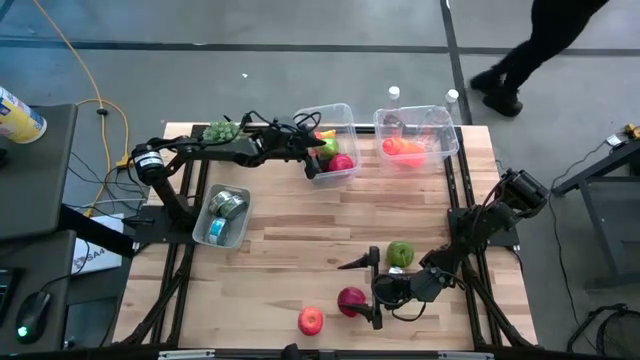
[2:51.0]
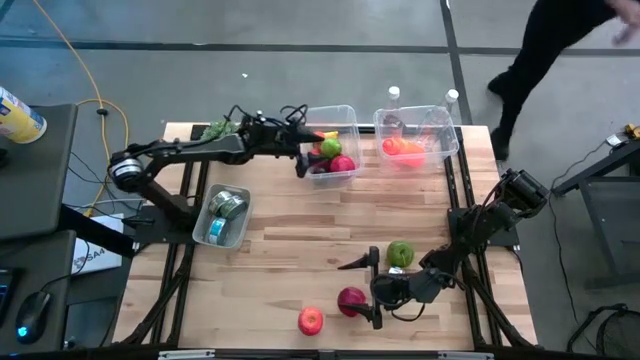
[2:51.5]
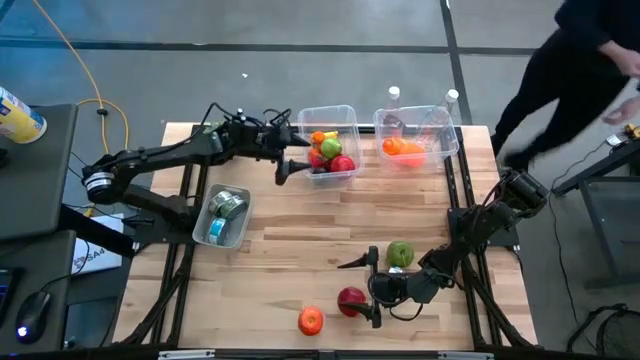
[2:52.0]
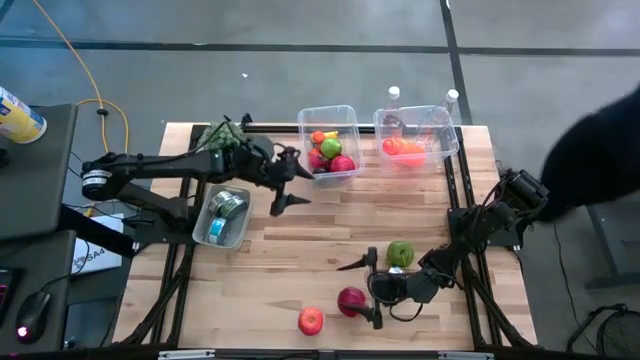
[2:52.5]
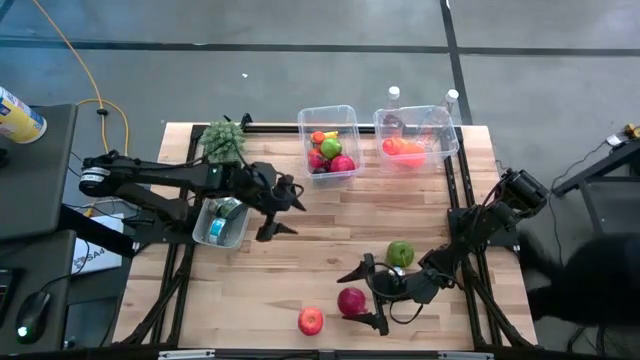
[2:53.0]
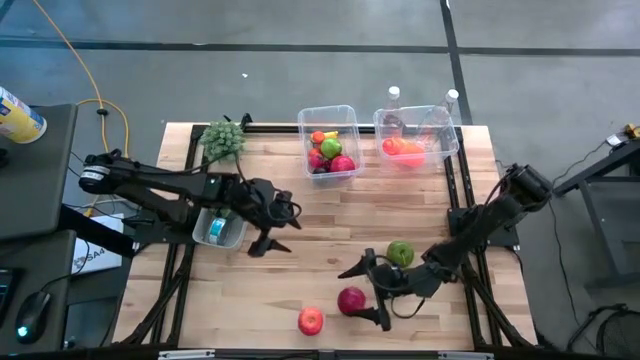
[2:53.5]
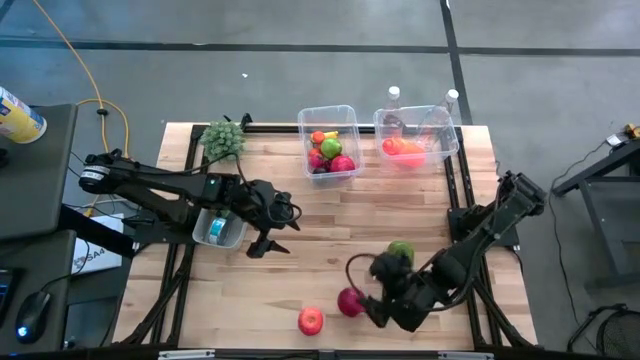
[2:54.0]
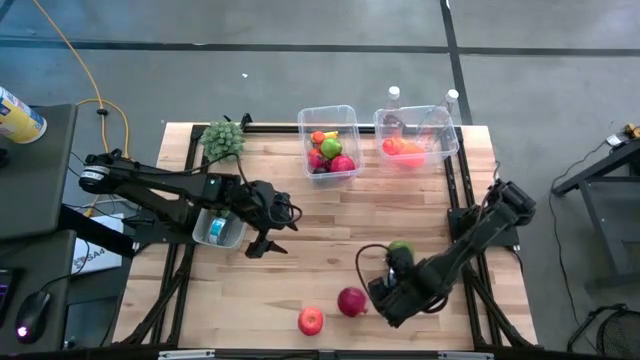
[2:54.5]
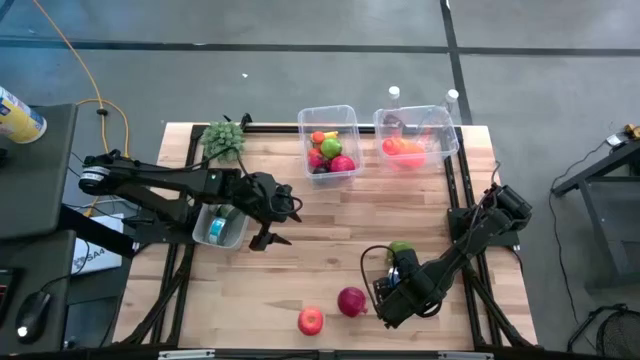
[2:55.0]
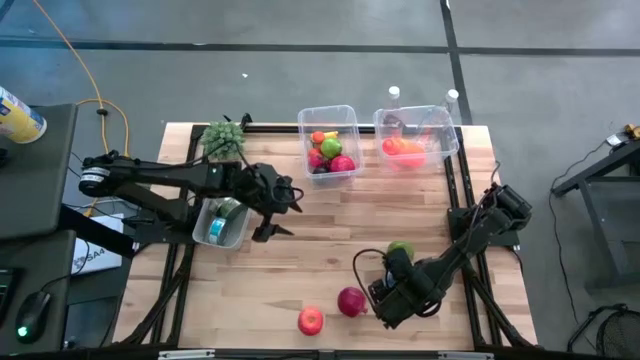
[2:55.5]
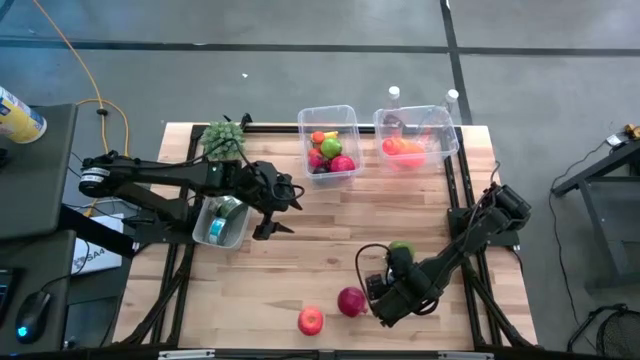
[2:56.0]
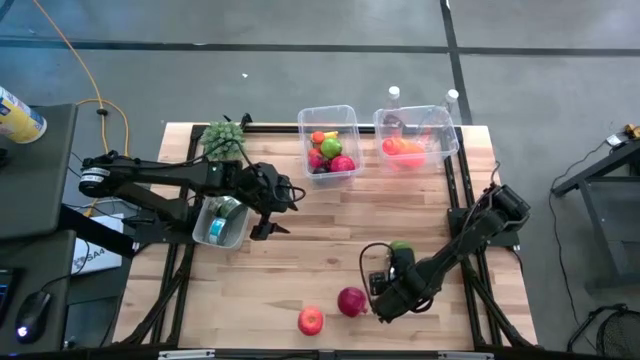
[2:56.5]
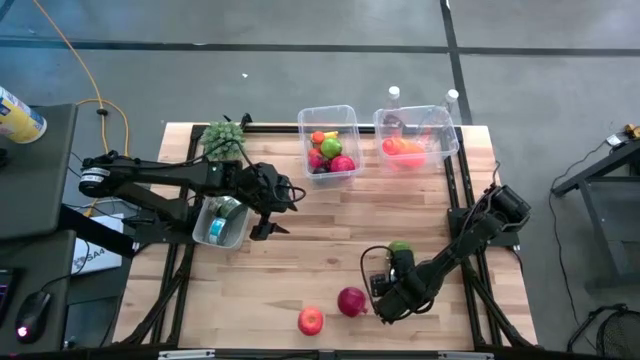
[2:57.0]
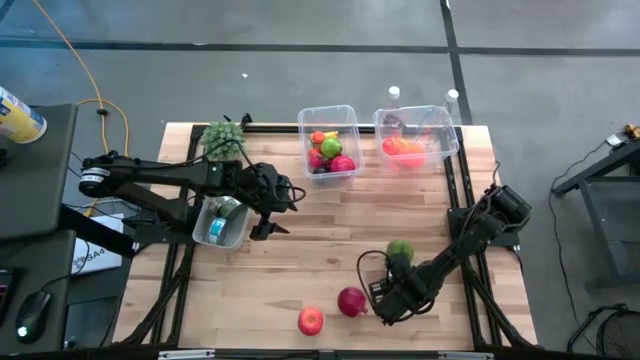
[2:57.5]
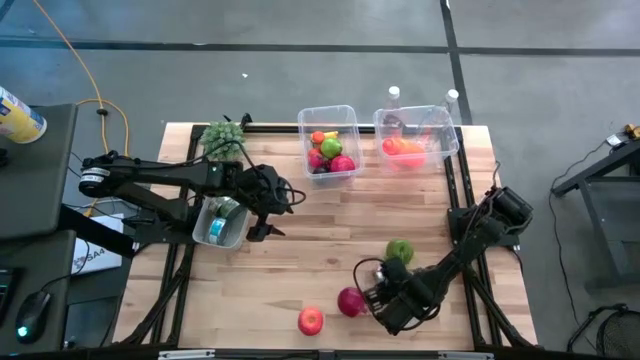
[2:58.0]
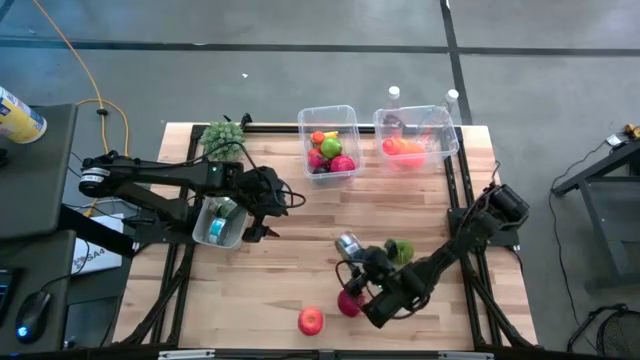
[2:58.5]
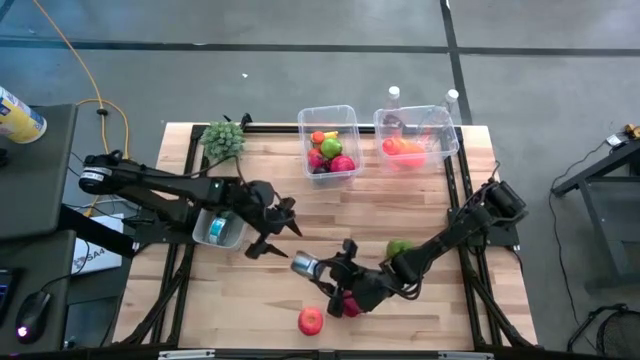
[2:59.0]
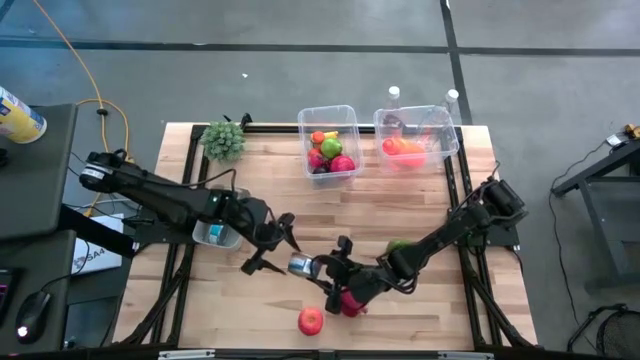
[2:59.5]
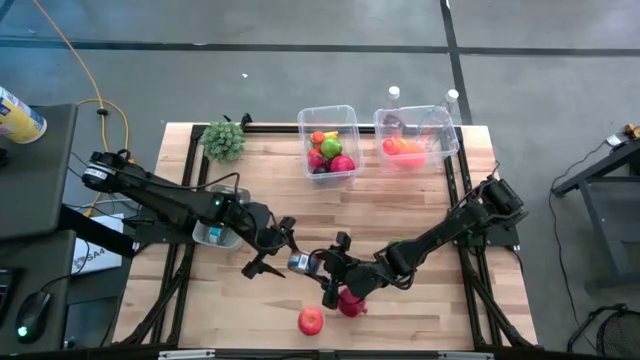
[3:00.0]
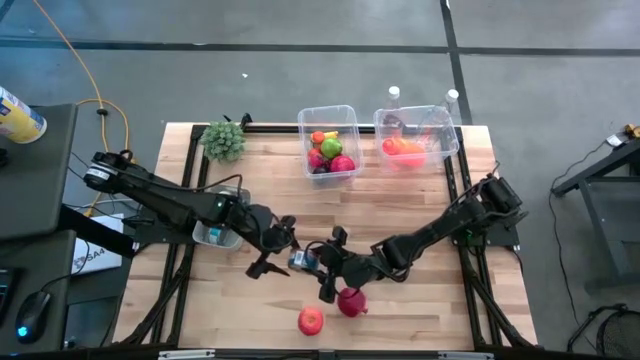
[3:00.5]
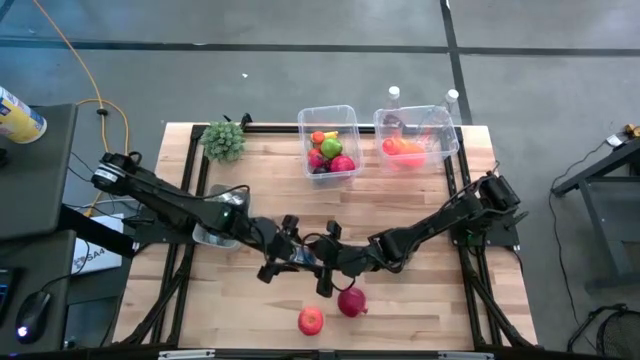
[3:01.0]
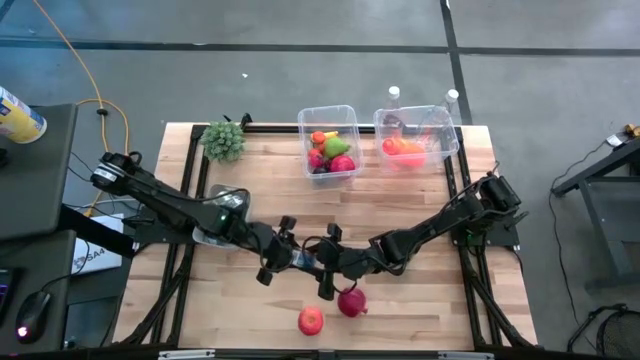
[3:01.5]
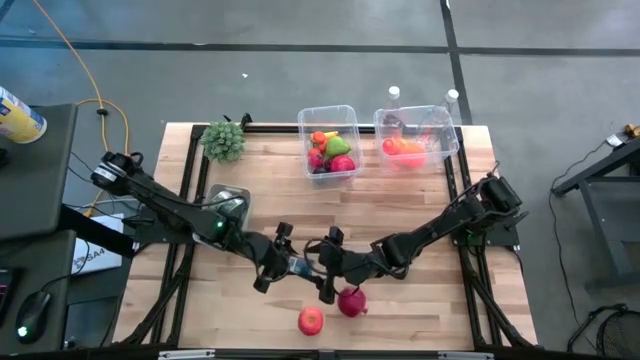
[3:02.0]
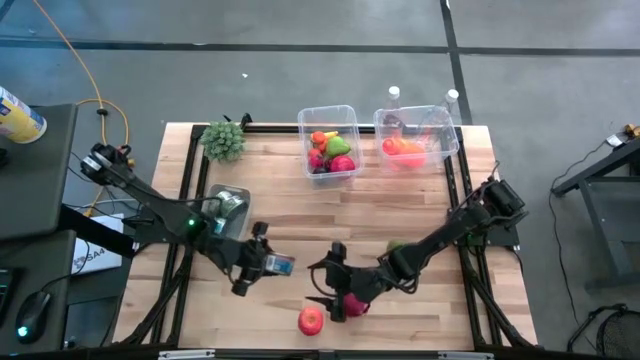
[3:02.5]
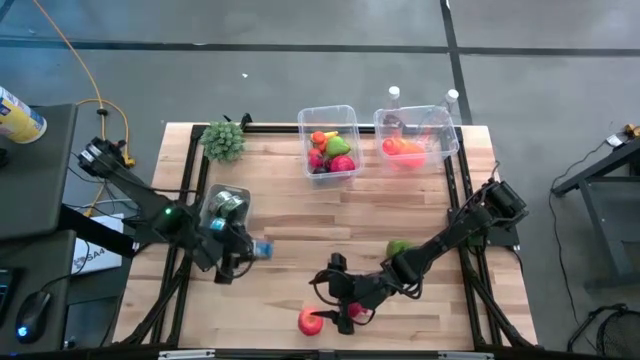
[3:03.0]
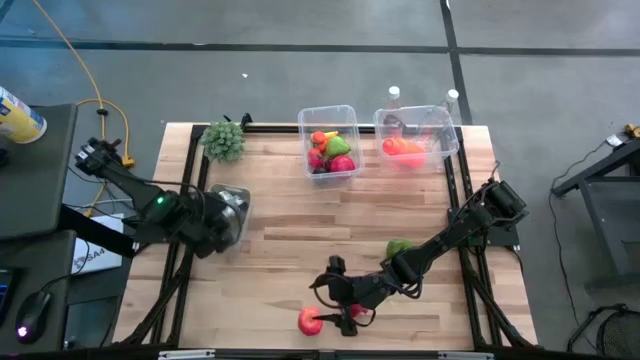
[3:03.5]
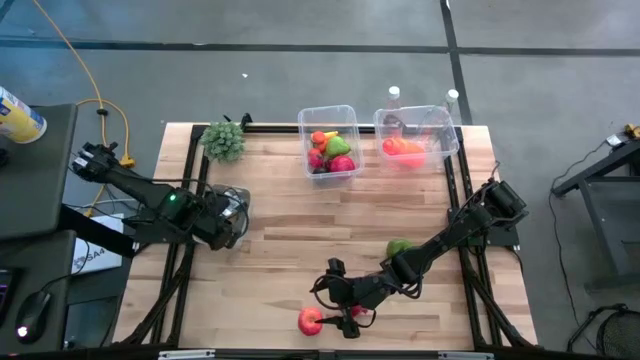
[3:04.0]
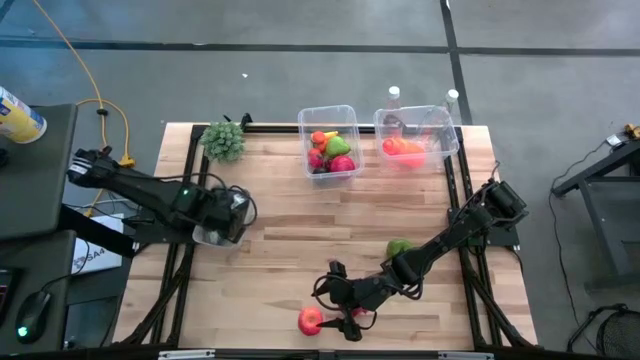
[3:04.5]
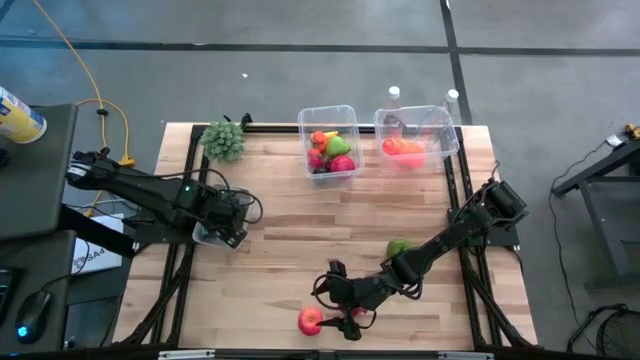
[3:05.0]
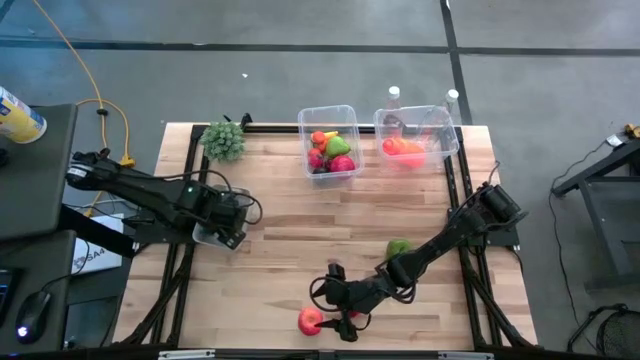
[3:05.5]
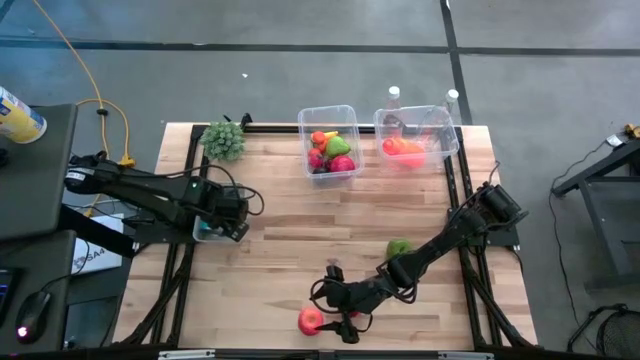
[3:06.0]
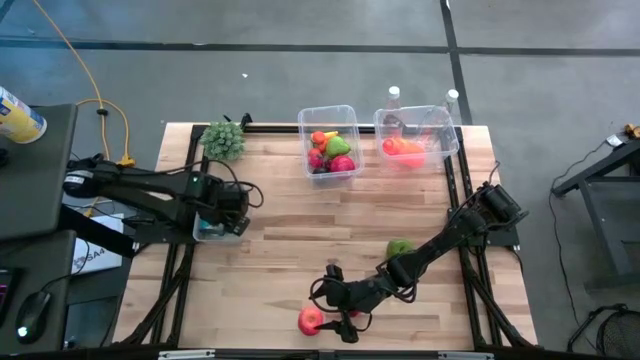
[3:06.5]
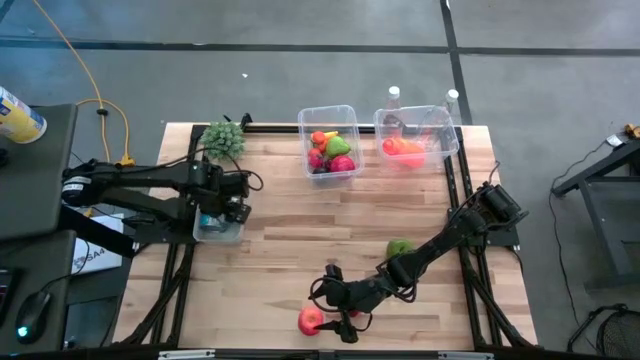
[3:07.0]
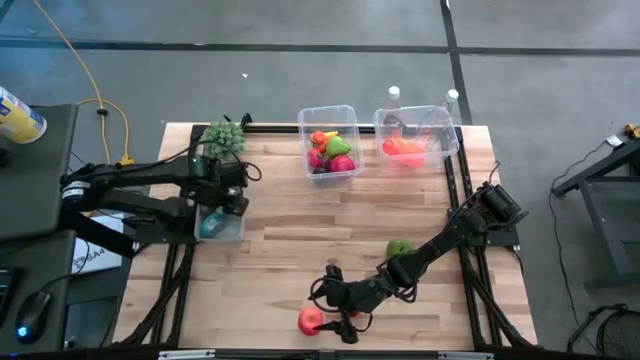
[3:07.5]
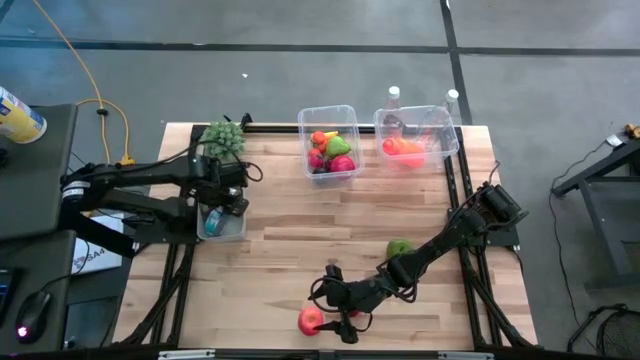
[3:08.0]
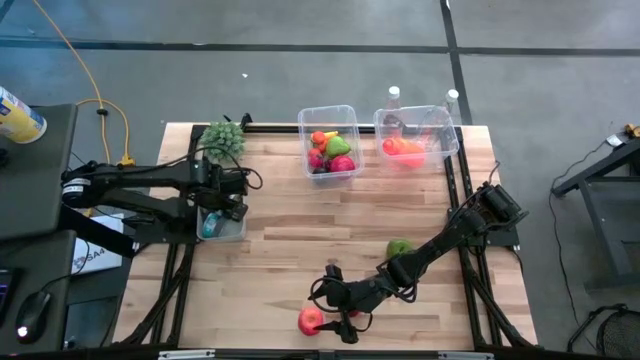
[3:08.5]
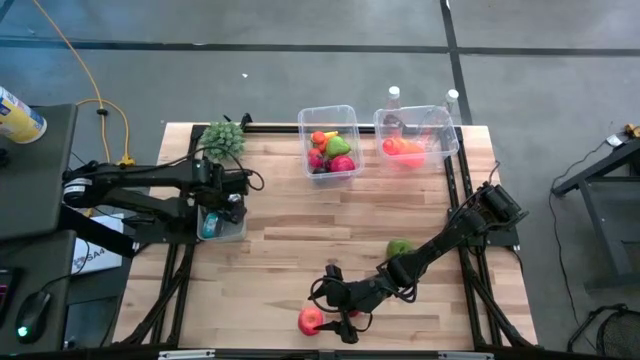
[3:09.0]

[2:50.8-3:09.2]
Task: Pick & Place Food Item
Put the blue tuna can into the gray bin

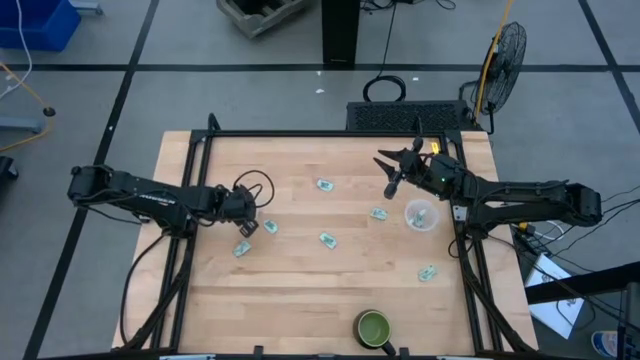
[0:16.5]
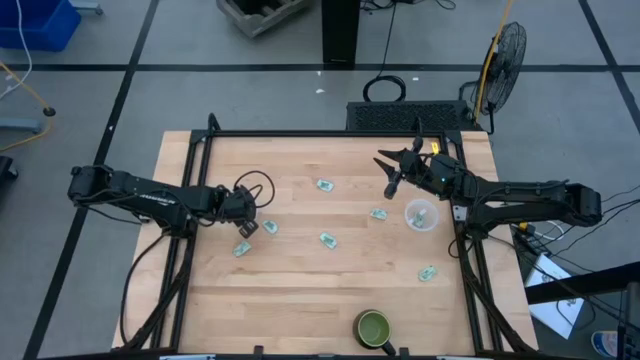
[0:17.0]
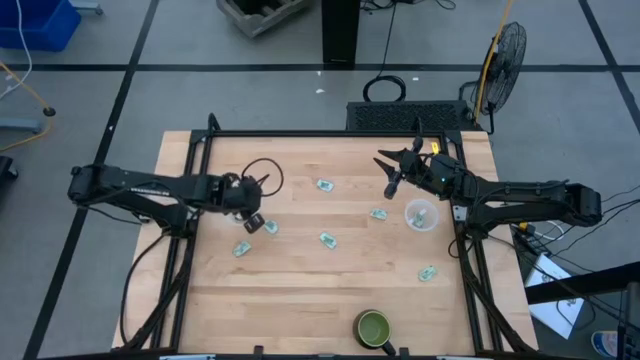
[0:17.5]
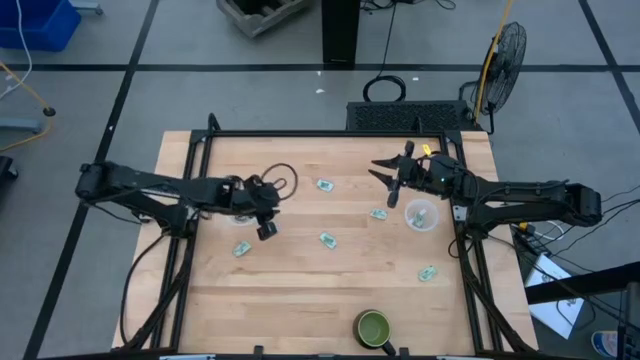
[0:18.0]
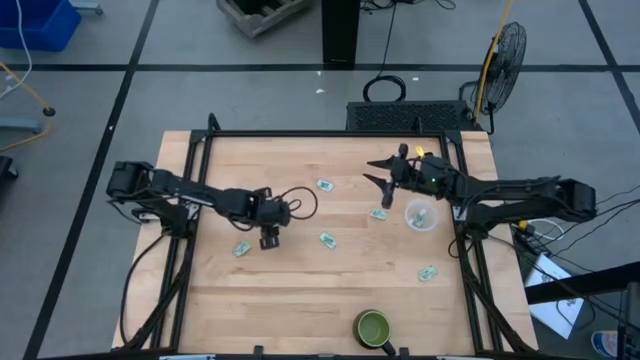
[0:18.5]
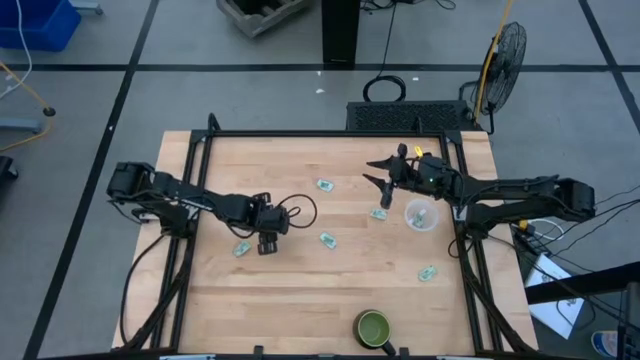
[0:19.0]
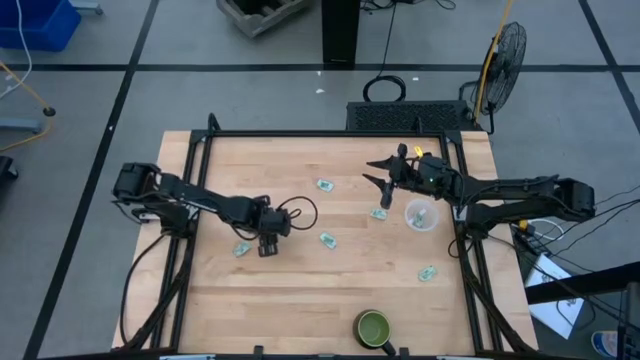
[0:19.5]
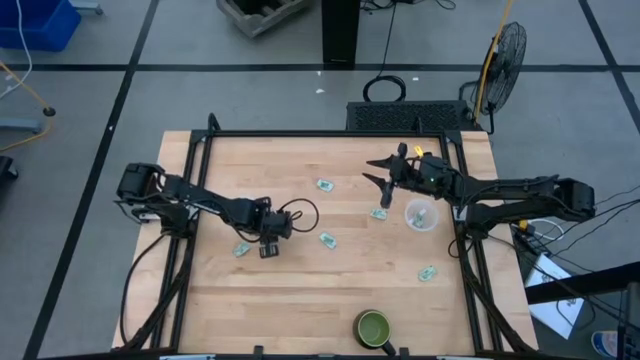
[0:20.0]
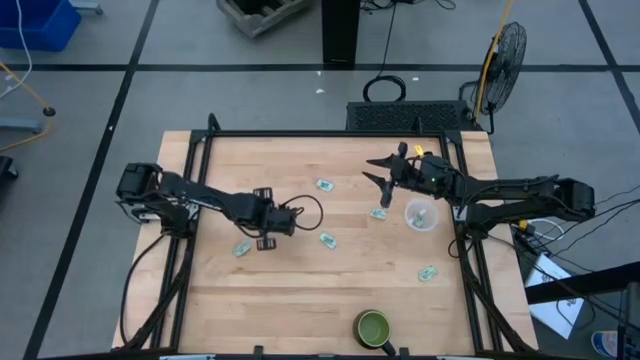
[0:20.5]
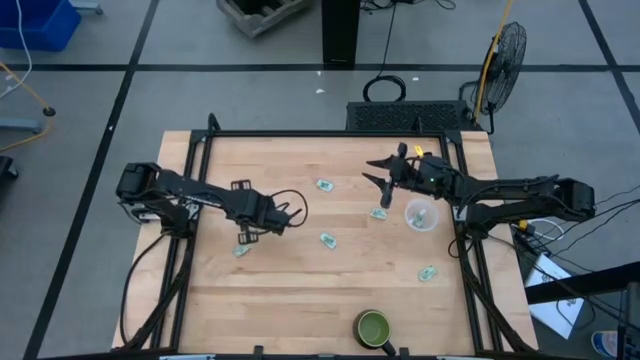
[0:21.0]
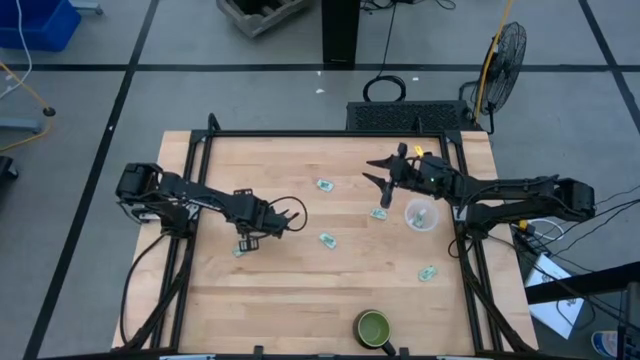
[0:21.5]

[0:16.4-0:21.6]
Task: Pick and place Stevia / Truvia into bins
Put the stevia packet into the left transparent container
